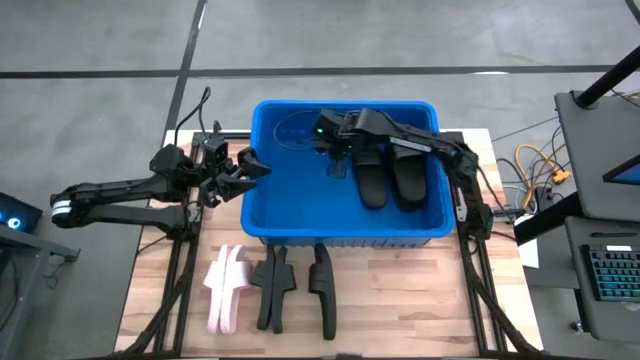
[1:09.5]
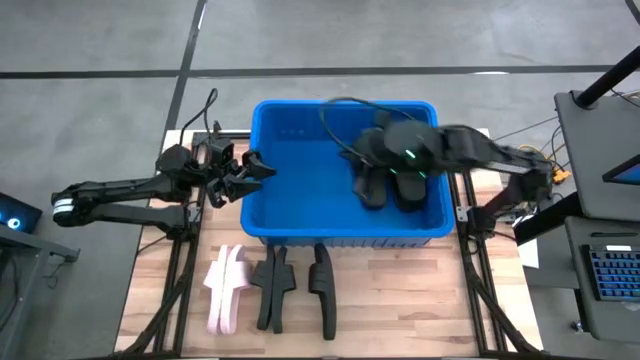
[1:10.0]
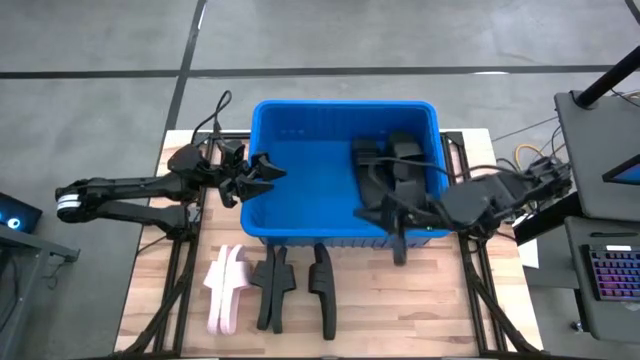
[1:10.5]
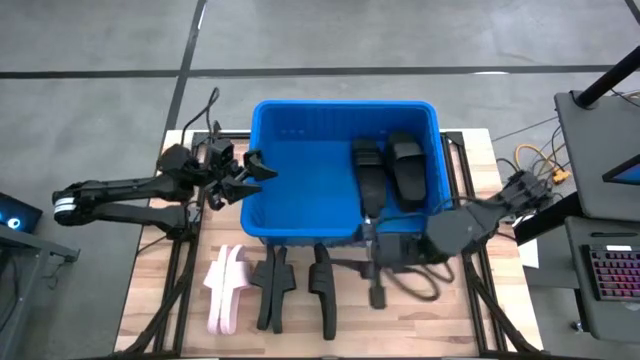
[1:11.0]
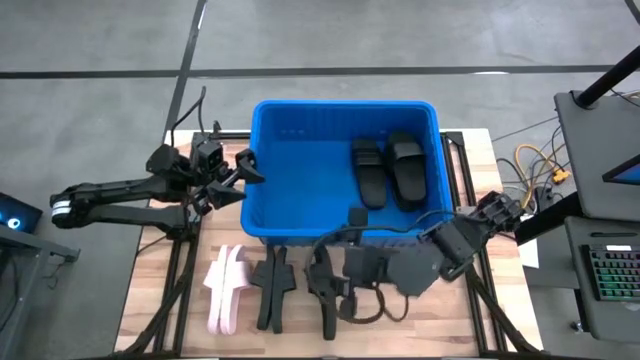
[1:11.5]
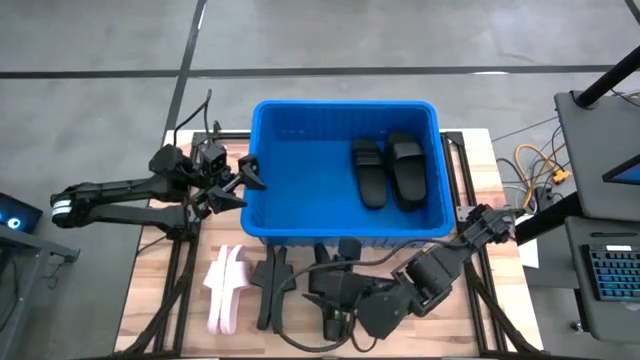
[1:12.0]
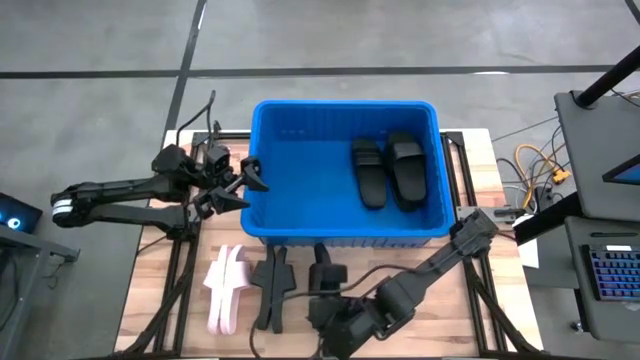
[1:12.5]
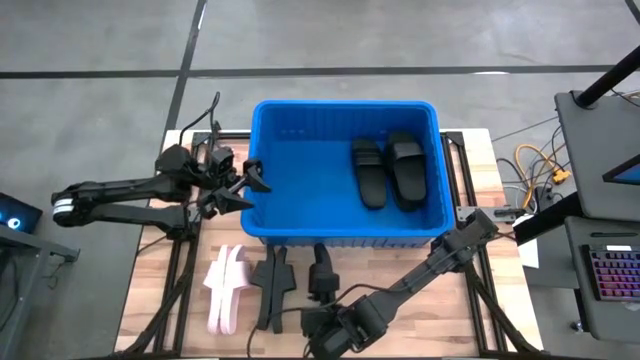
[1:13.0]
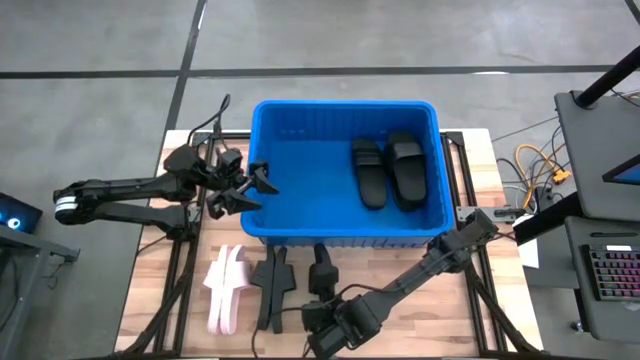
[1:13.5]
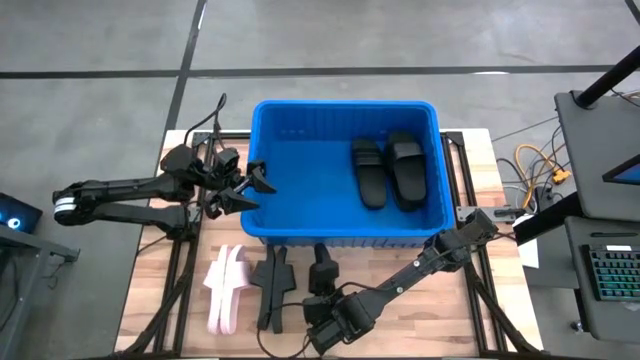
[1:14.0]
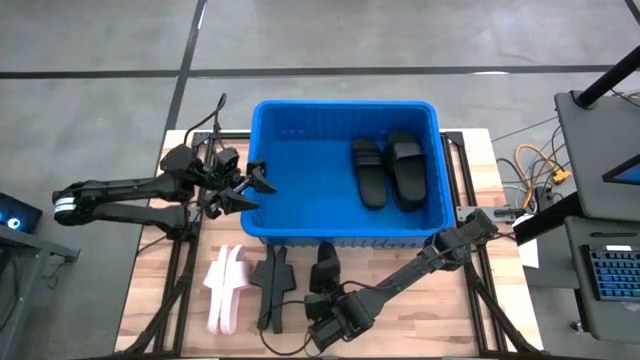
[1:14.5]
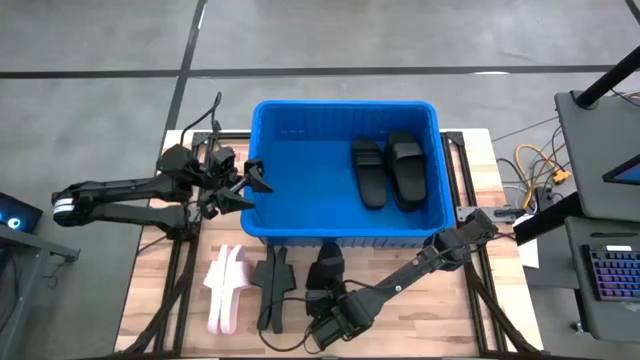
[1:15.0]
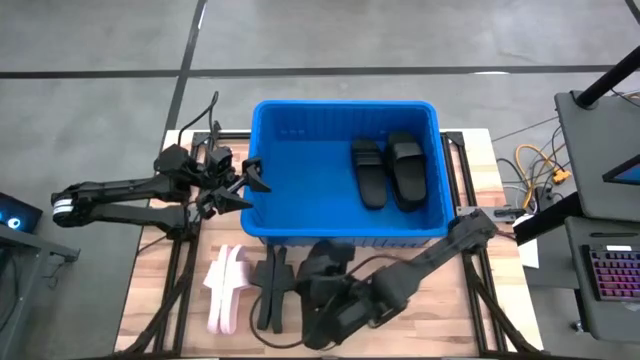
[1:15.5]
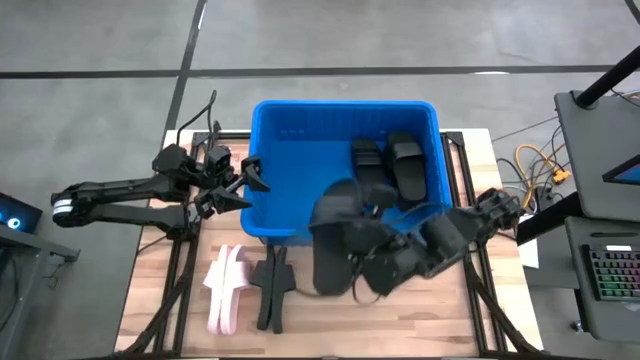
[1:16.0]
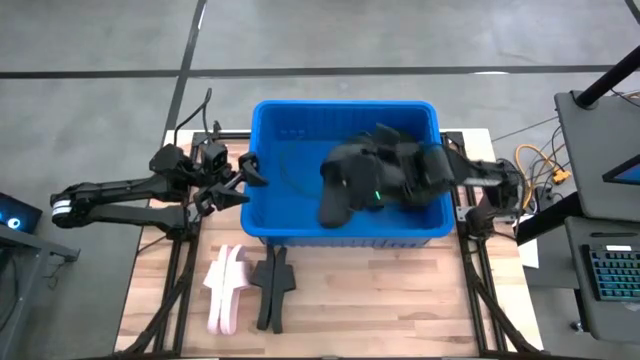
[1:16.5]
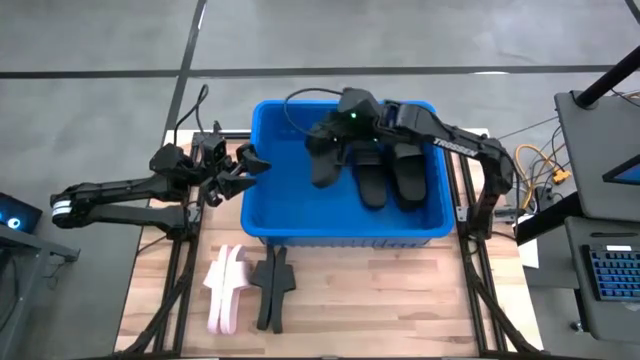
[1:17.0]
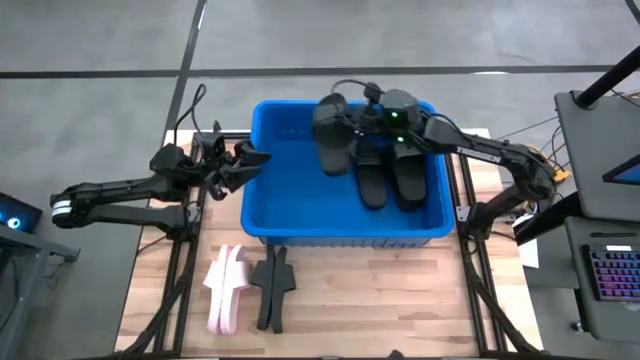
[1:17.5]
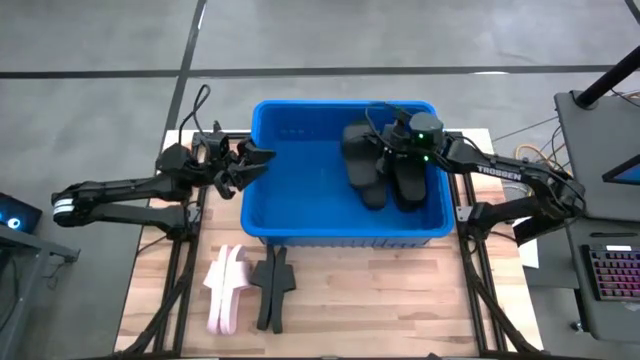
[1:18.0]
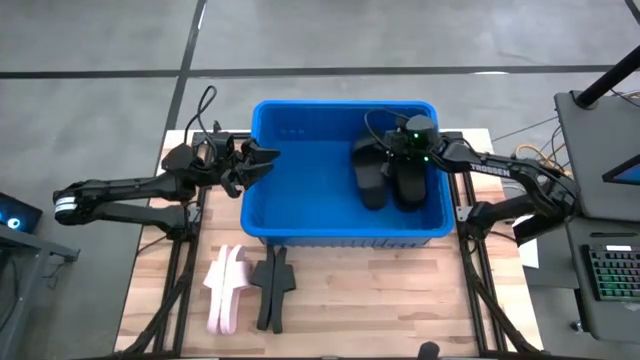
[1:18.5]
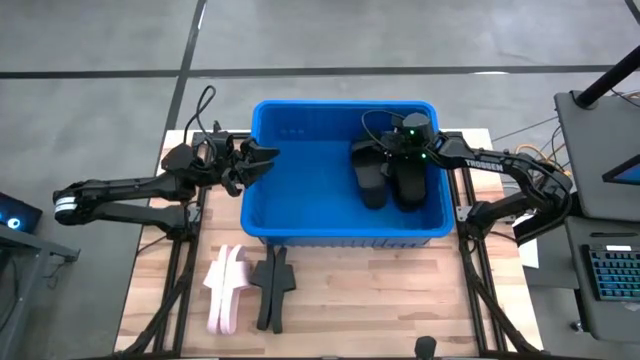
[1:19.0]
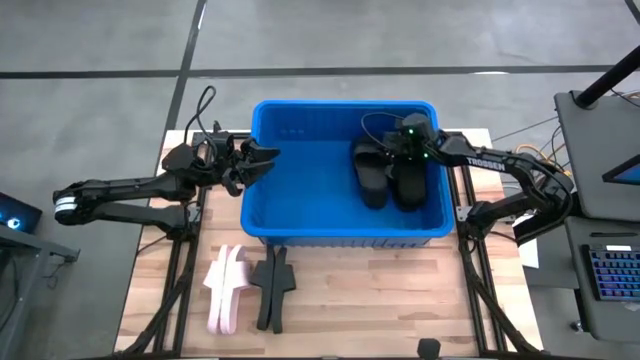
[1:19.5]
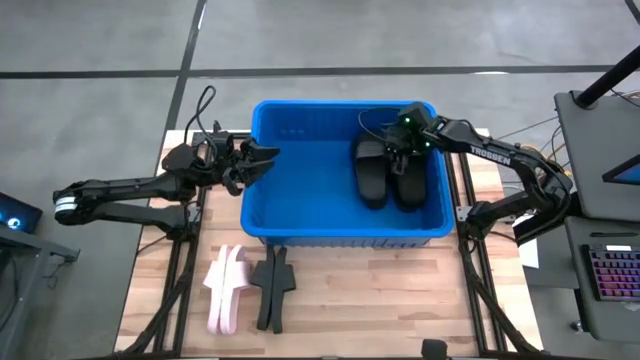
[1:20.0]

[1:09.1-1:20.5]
Task: Pick and place slides into bin
Put the right black slide into the bin

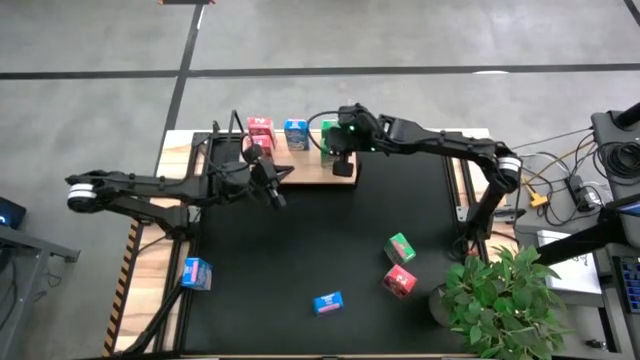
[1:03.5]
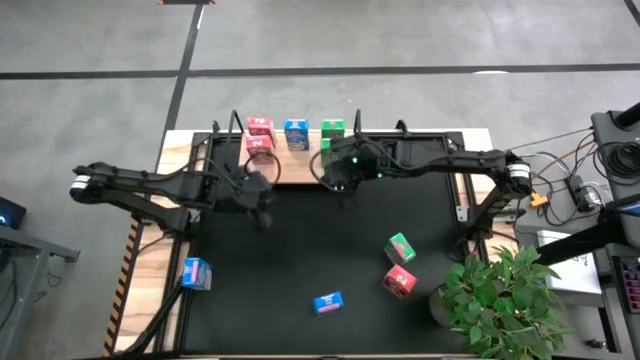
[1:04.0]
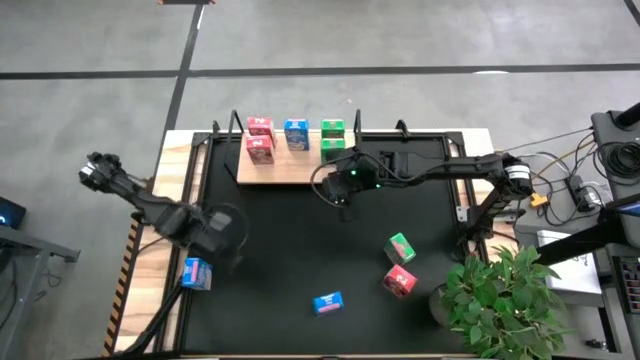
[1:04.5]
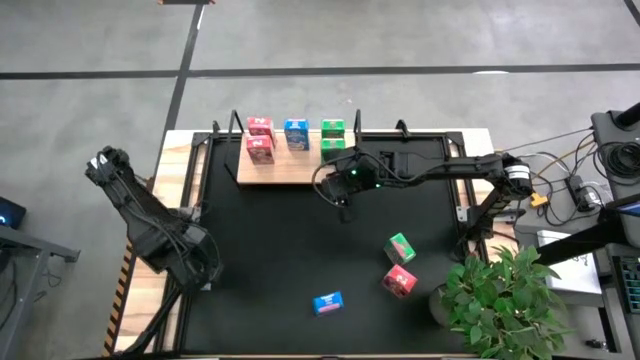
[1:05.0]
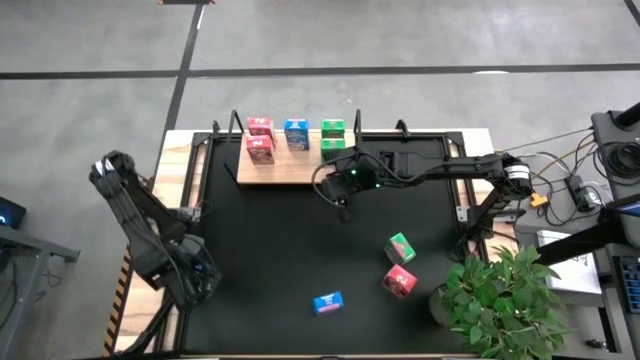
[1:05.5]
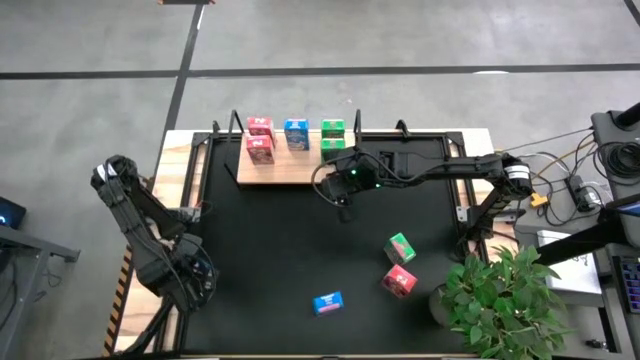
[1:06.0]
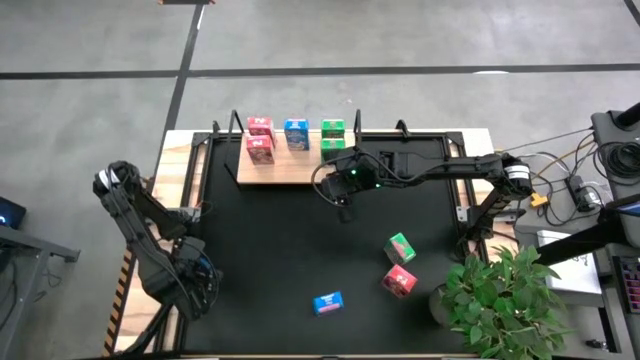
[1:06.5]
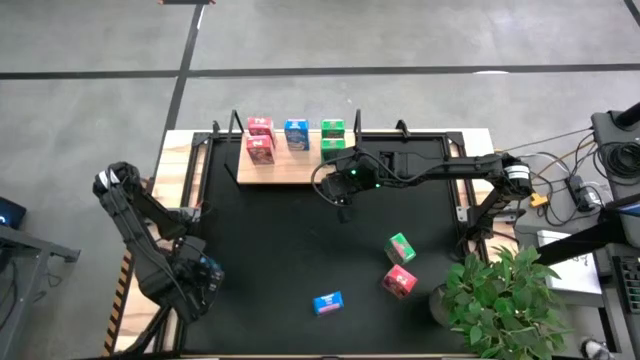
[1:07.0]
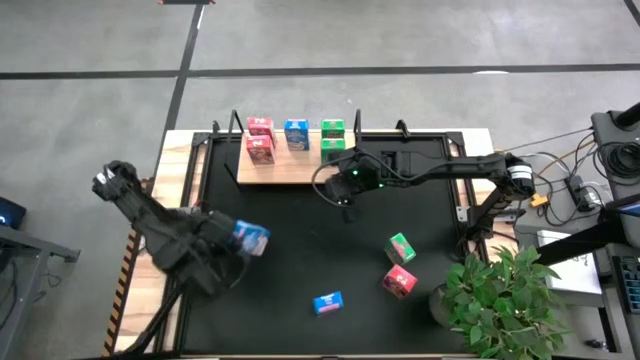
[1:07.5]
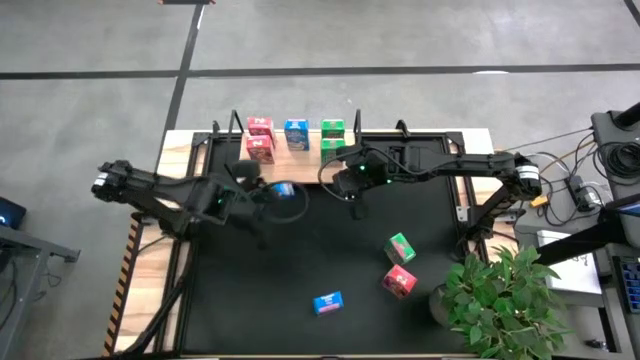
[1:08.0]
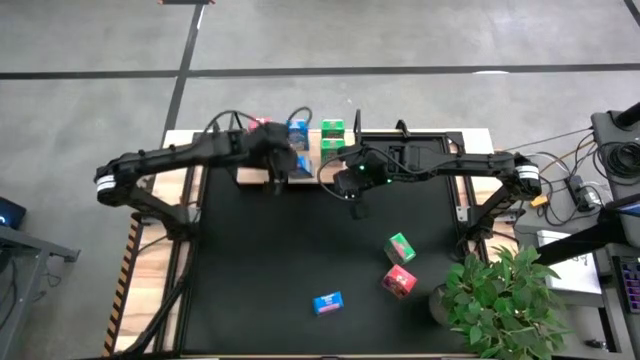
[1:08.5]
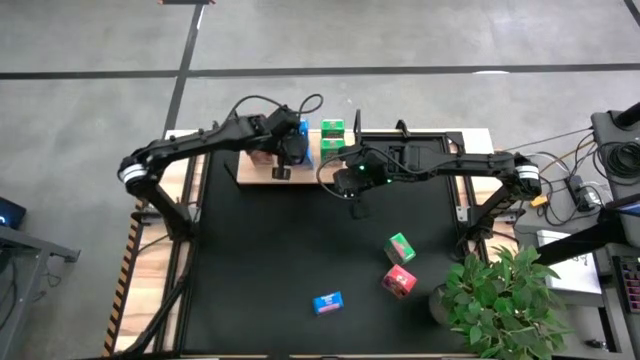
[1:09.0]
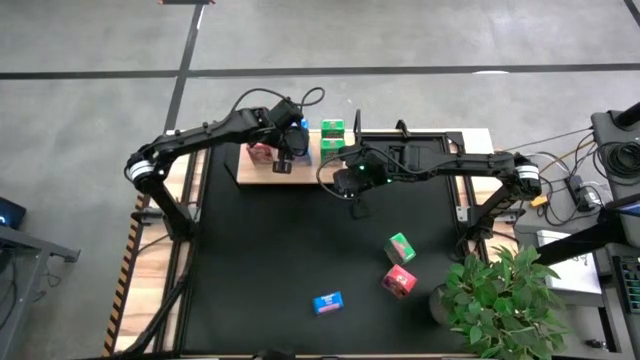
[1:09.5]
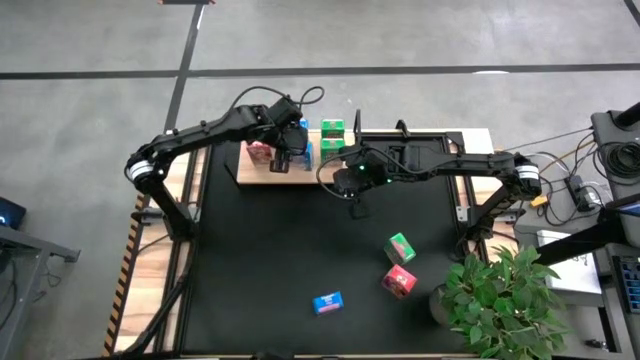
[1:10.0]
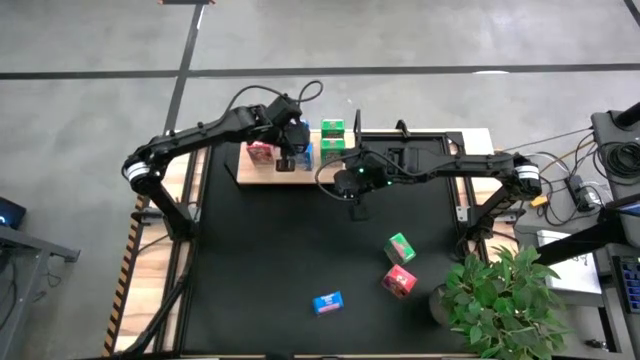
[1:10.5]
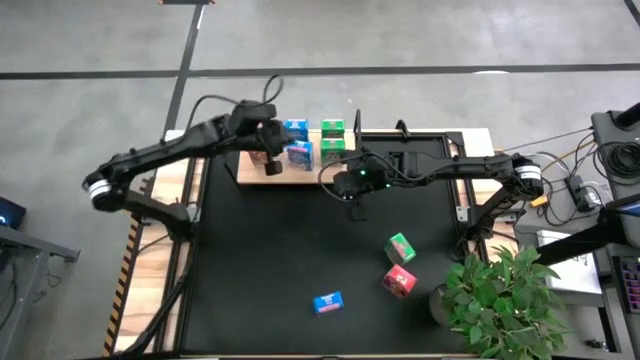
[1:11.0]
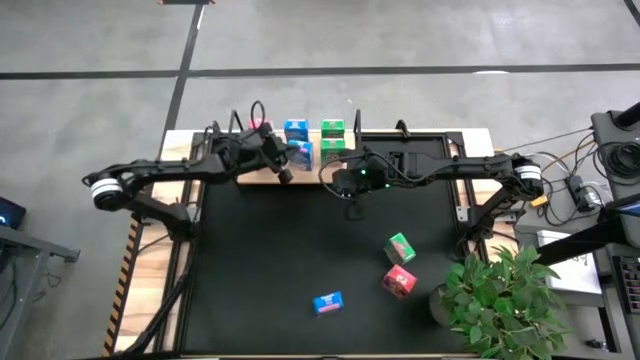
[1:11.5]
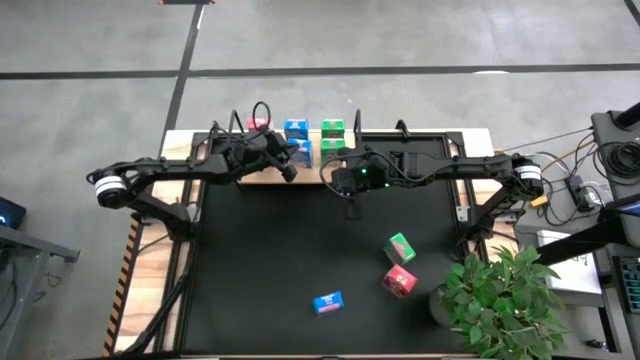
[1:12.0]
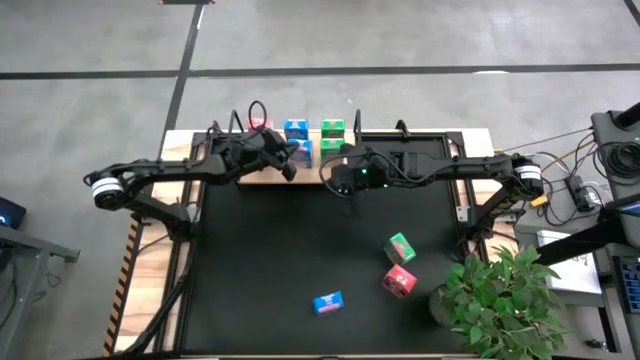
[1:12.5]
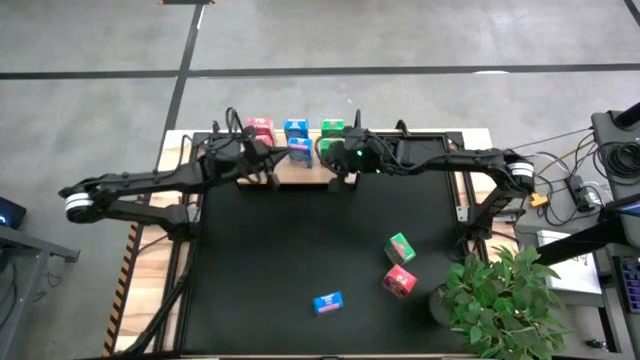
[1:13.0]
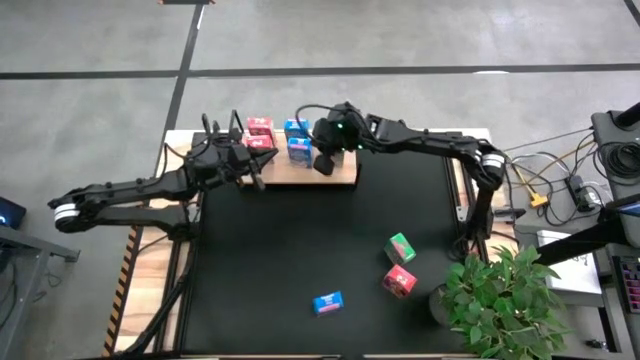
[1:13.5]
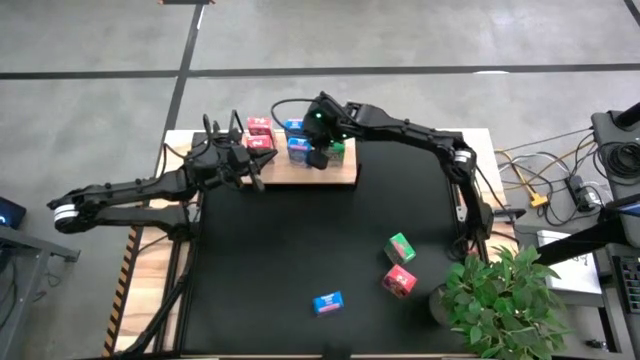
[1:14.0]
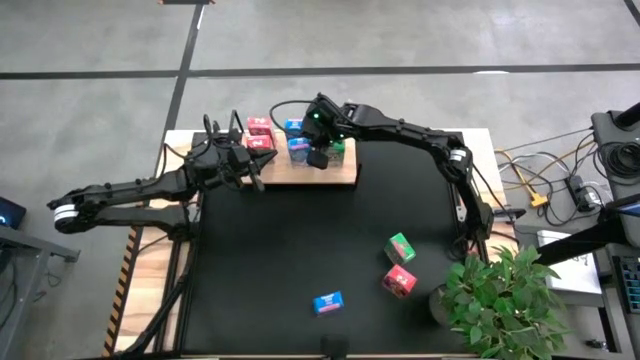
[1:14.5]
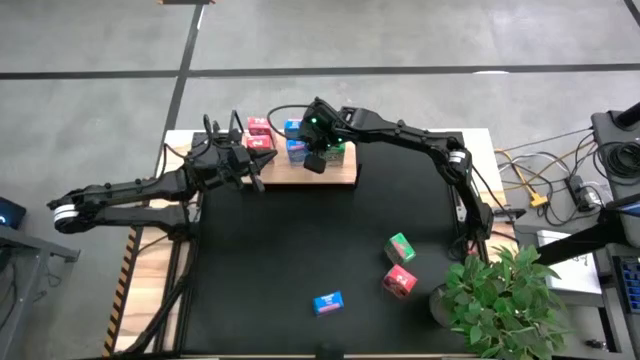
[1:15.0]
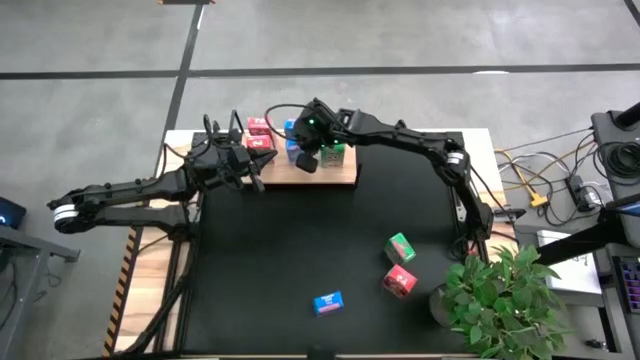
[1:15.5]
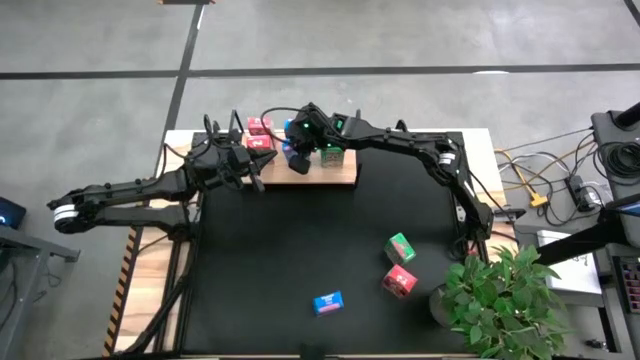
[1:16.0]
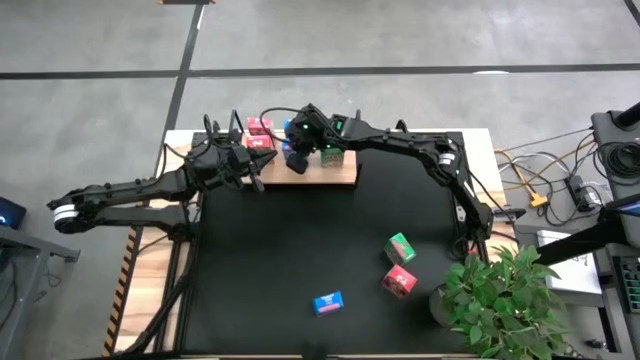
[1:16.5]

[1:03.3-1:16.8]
Task: Stack cereal on shelf
Put the top blue cereal box on the shelf aligned with the other blue cereal box
